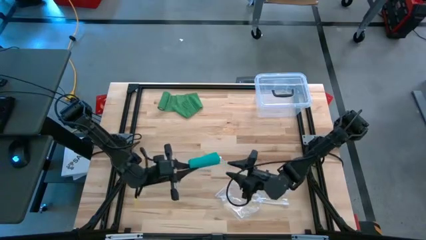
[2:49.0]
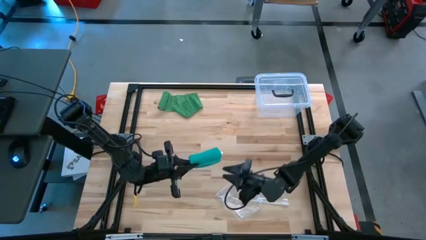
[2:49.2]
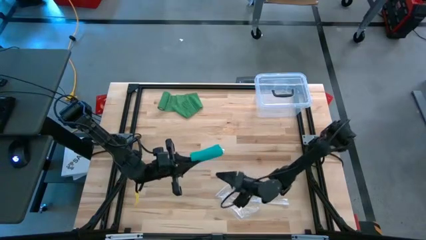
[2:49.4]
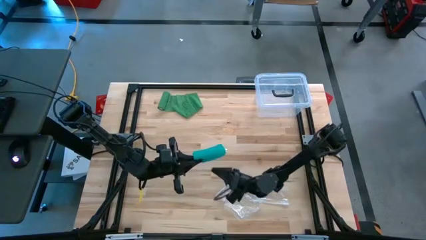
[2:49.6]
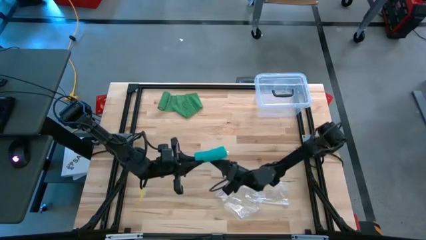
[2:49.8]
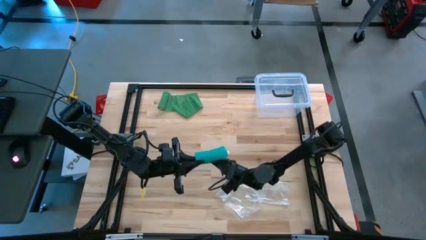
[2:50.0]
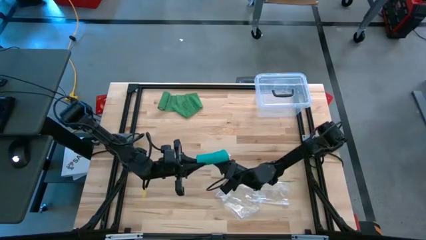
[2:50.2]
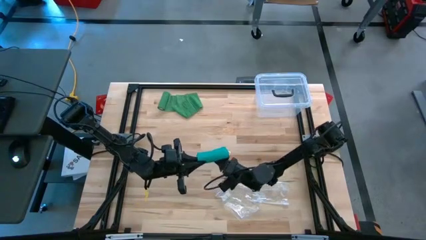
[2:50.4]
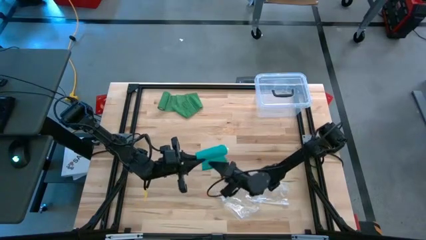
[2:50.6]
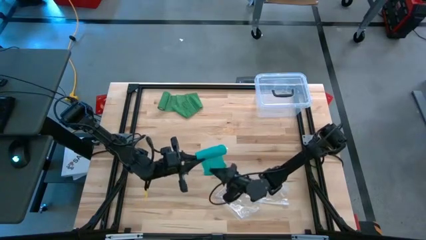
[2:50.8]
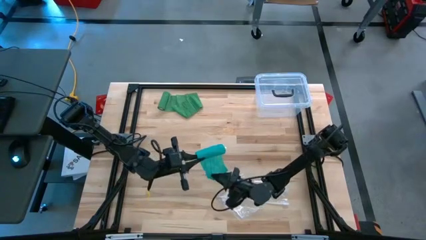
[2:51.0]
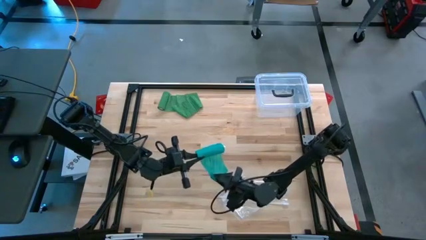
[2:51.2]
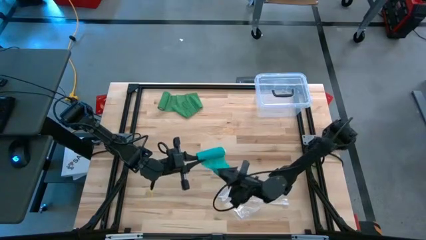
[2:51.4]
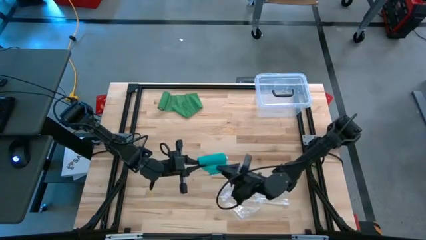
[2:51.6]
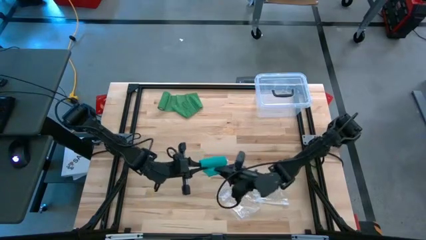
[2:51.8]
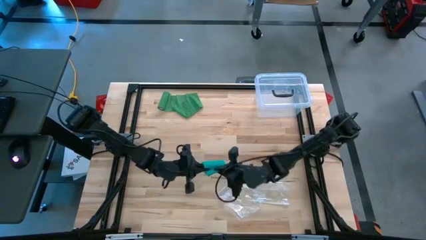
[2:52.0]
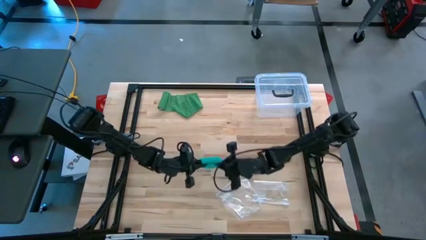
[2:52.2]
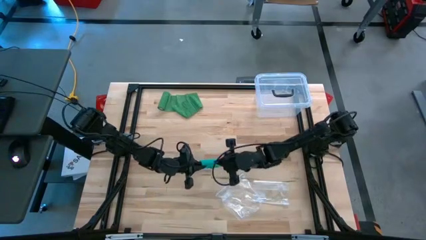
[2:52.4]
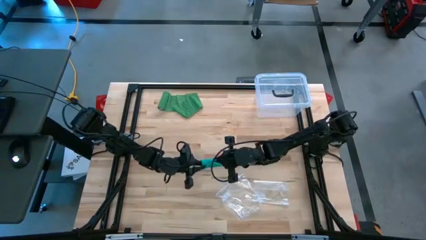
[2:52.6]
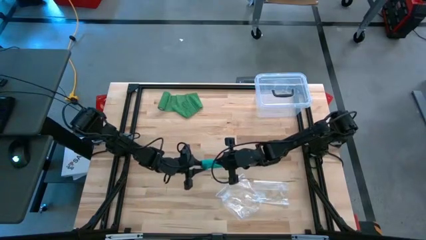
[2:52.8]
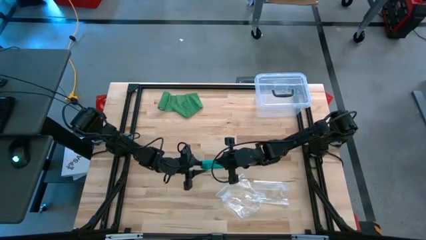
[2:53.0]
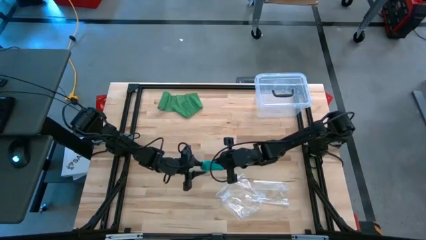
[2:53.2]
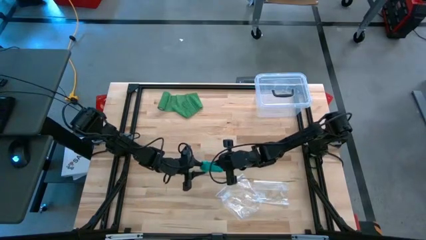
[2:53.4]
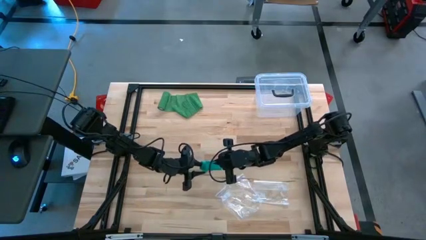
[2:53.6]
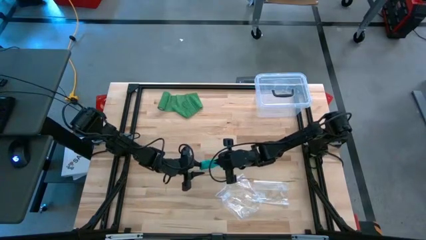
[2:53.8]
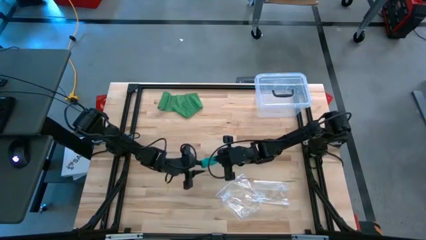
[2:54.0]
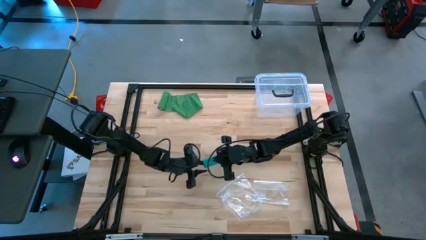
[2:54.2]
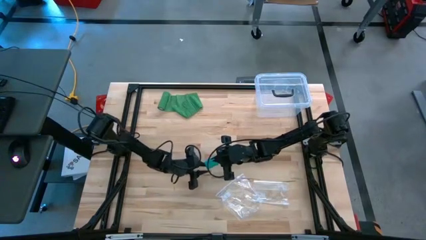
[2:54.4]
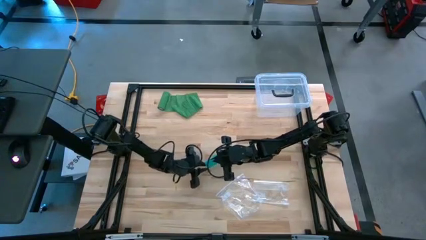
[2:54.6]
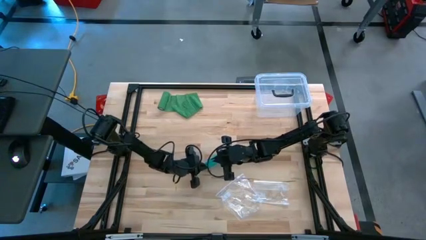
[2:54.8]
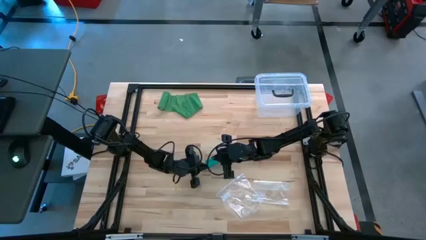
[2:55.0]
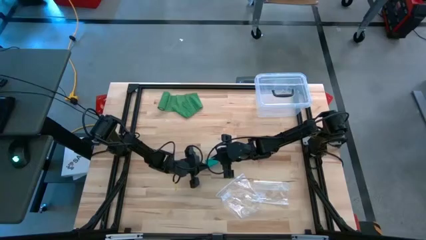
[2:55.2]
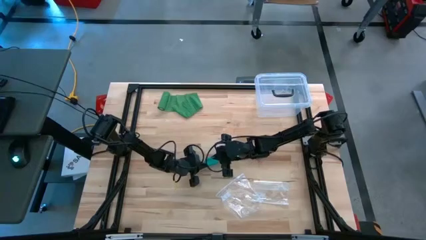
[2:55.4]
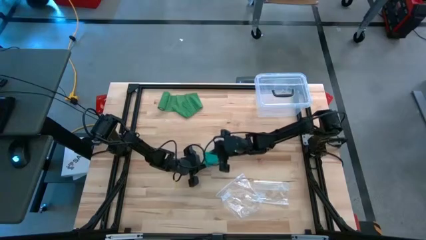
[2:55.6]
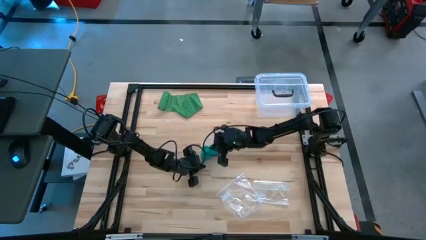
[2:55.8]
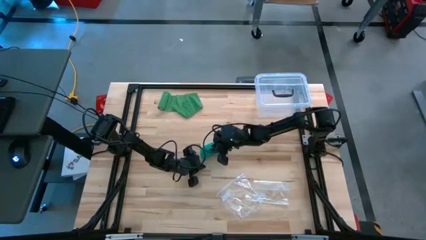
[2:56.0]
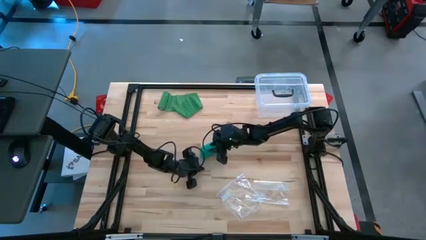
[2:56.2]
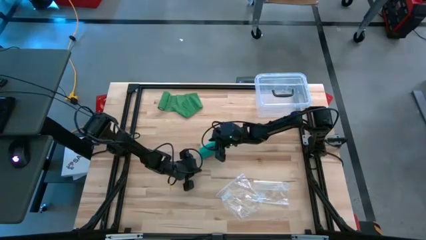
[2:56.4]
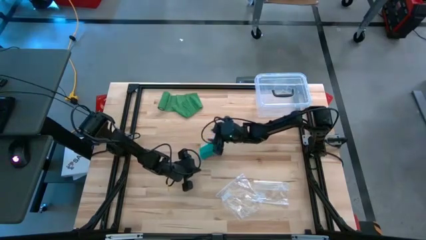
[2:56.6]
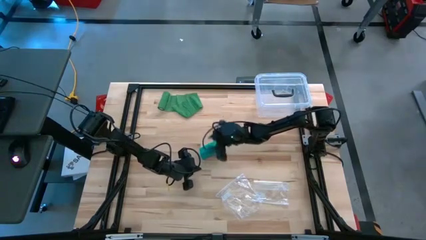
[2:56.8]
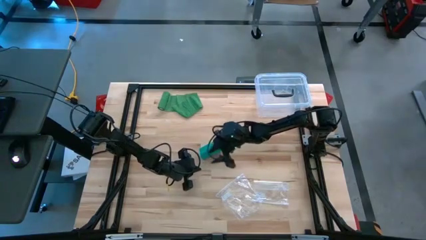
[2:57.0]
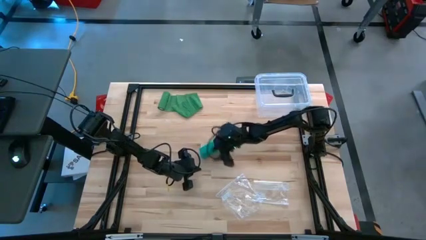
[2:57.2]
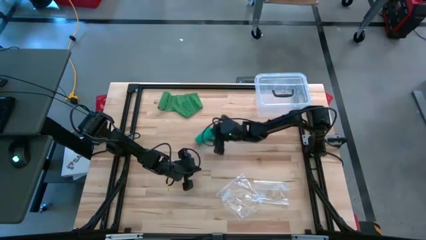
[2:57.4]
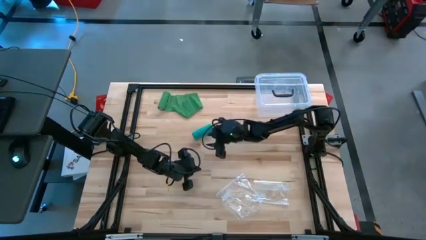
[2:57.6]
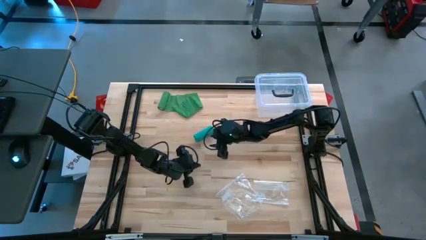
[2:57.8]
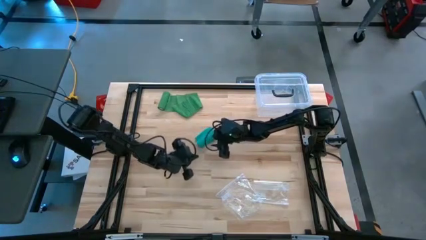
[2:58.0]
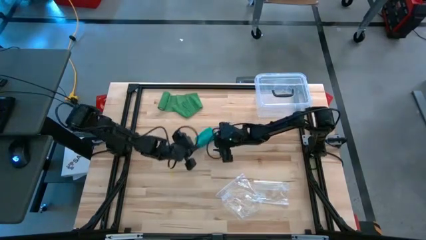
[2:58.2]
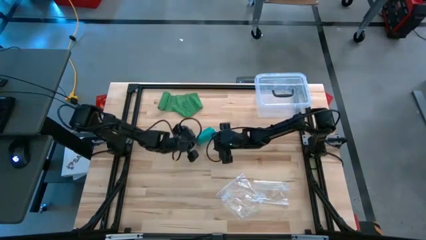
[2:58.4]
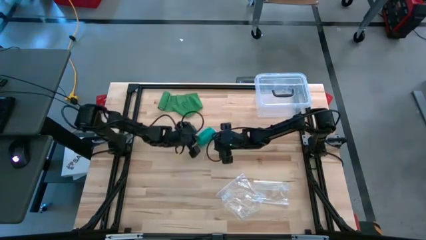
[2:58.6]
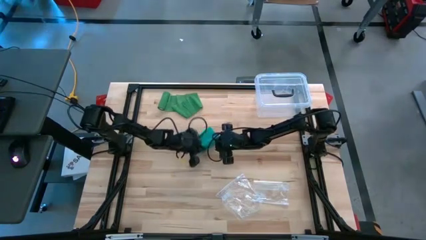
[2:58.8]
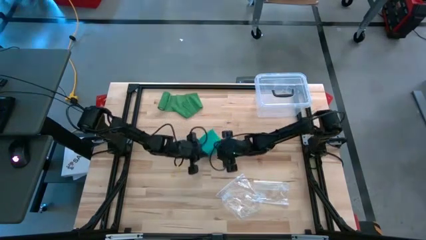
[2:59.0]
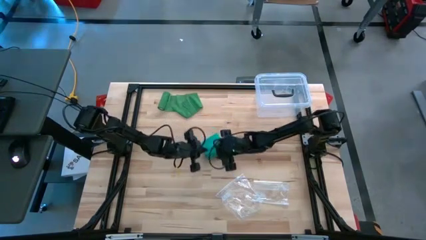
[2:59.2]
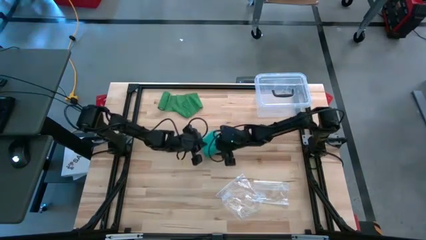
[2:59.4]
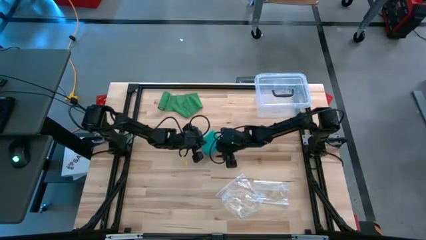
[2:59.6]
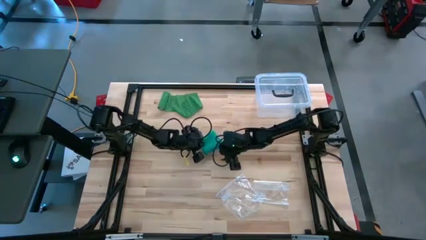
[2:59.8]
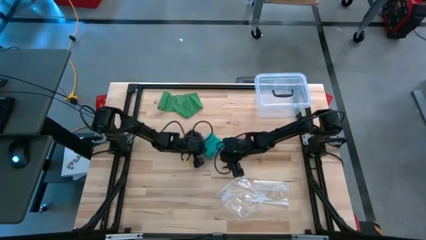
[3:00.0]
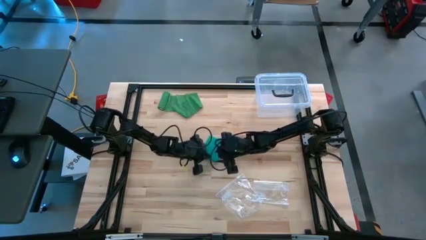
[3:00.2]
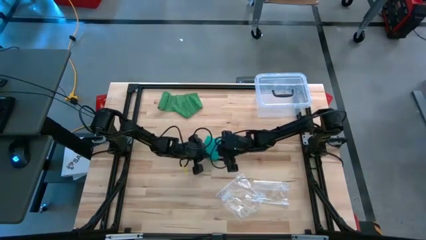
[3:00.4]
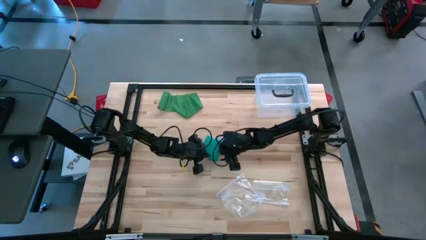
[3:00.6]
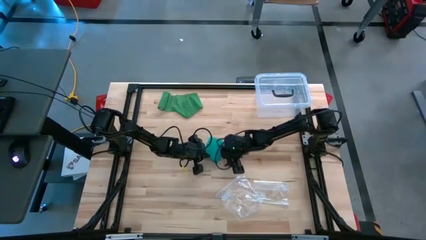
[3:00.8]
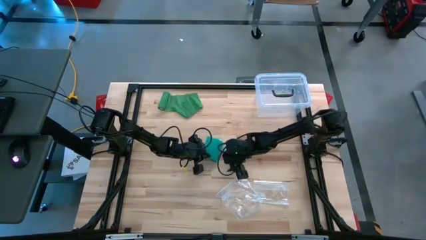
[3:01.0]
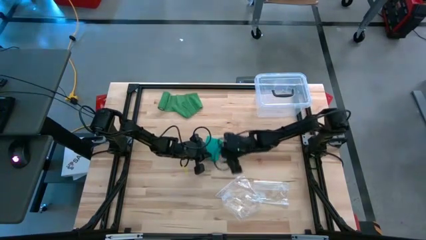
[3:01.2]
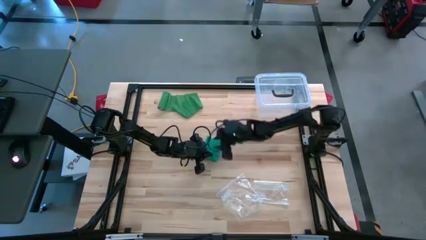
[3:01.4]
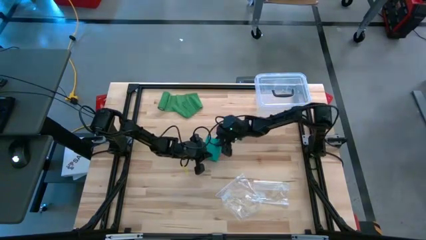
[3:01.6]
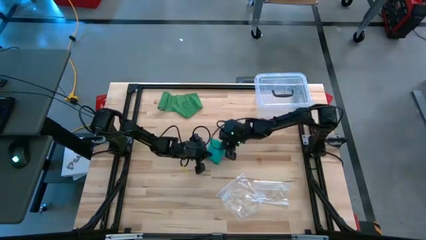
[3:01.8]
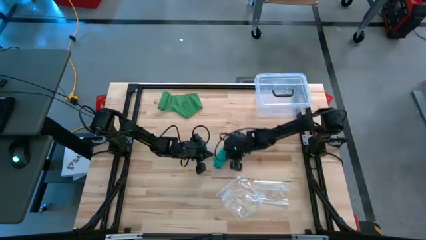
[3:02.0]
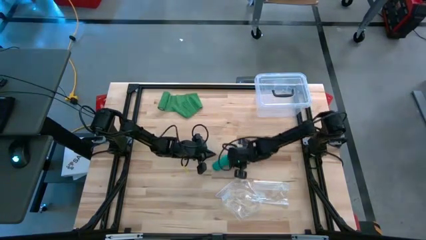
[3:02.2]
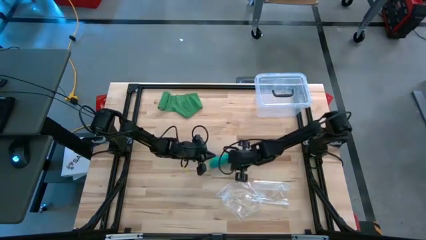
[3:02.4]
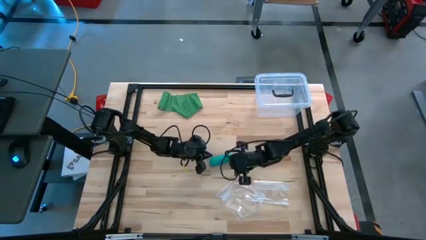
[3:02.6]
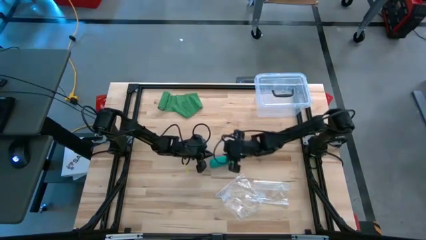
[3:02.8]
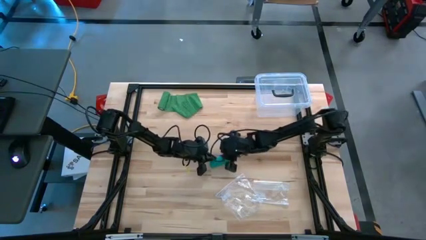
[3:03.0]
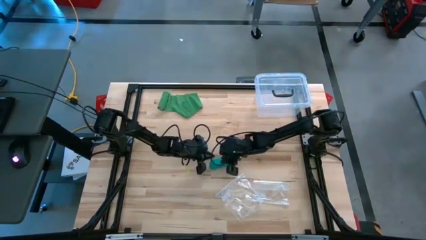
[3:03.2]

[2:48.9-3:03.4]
Task: Roll bandage
Roll the blue bandage

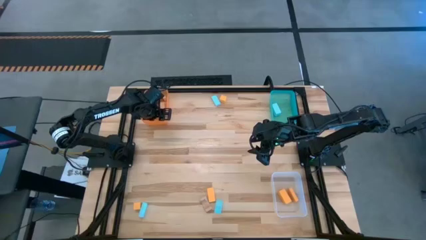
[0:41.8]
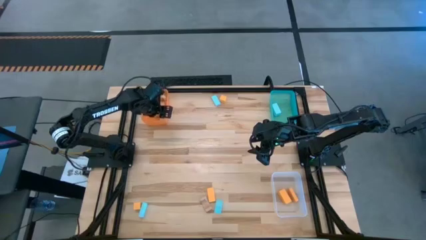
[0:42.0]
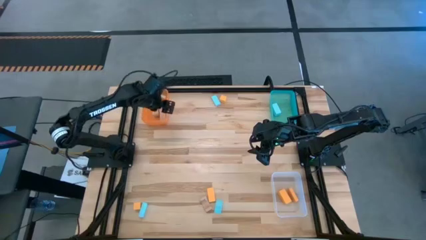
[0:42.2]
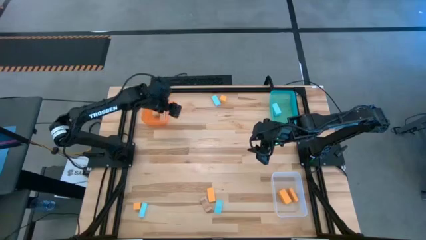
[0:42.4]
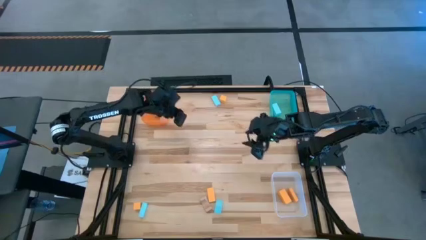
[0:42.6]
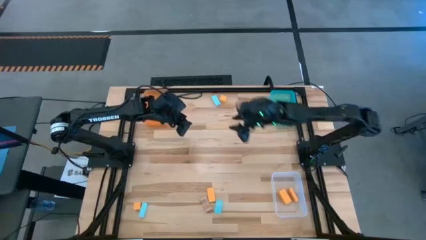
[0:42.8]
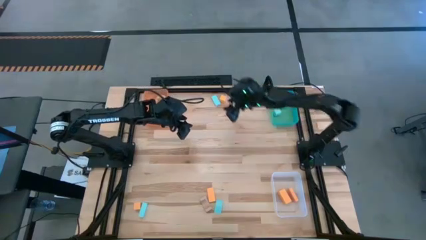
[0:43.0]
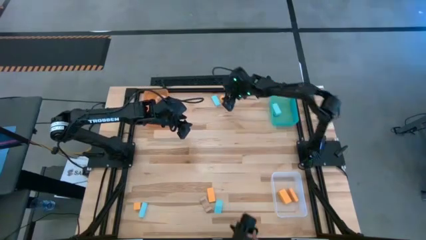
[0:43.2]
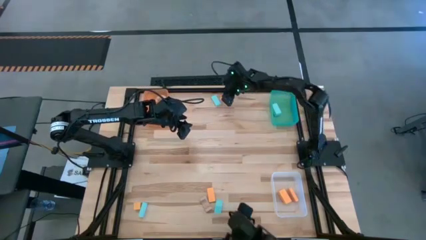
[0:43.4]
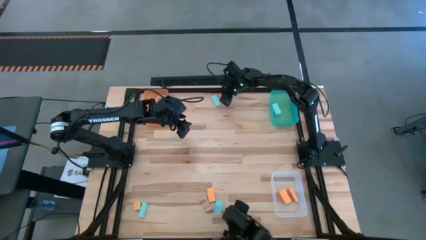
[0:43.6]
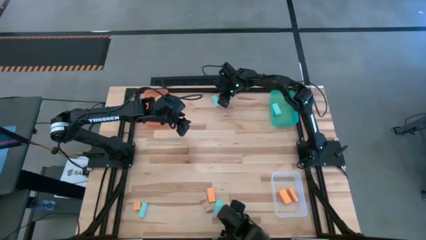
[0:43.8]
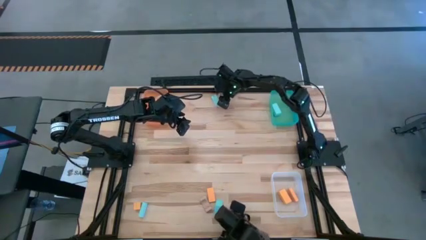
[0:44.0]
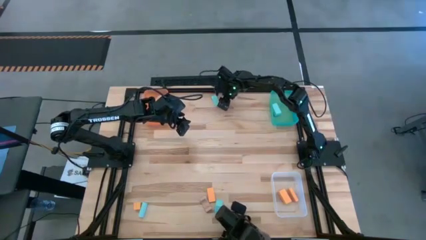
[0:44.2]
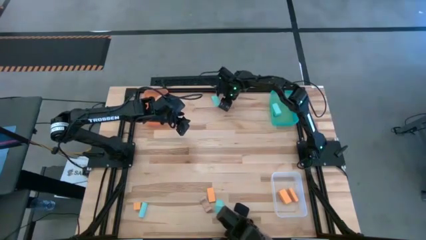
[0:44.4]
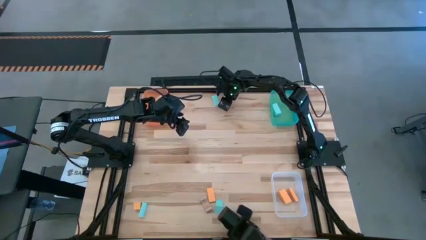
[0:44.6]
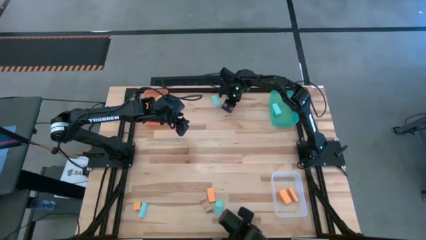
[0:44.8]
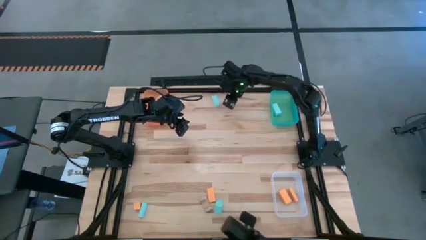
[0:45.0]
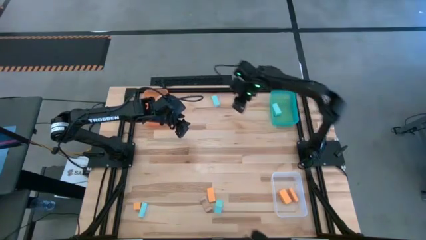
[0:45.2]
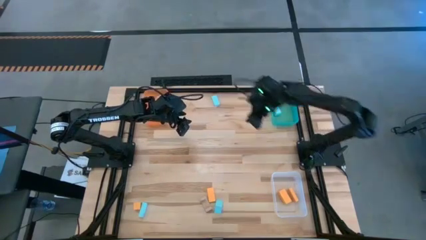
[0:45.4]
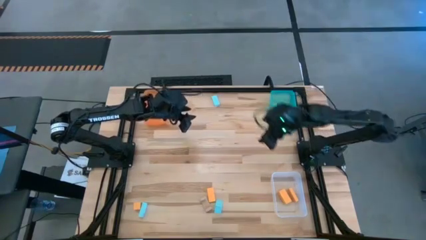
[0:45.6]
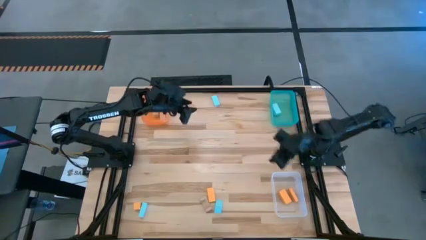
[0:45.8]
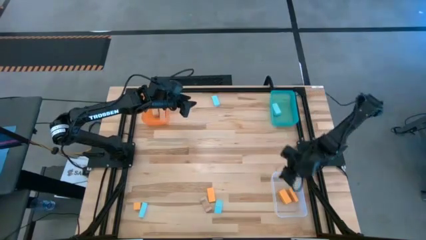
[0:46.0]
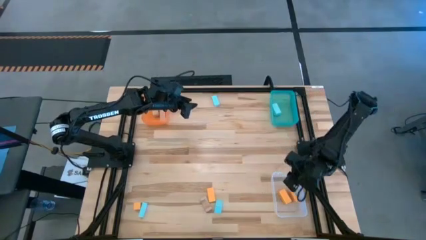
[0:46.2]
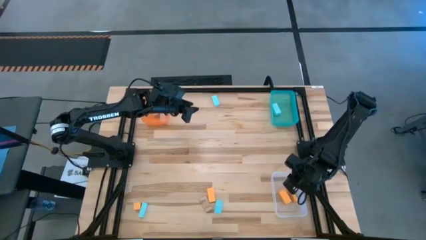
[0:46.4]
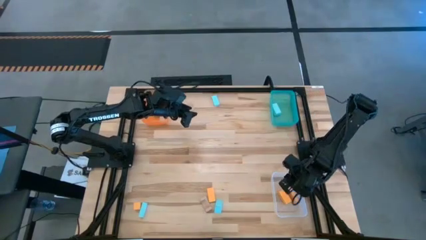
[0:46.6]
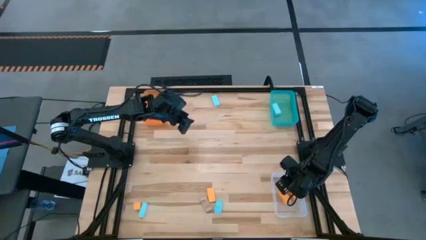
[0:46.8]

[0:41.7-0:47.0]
Task: Sort & place blocks by color
Put the orange block into the white bin
